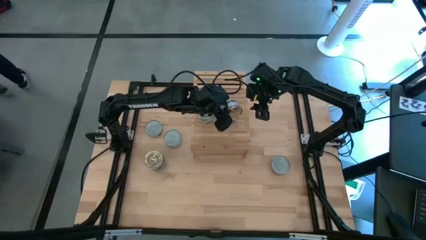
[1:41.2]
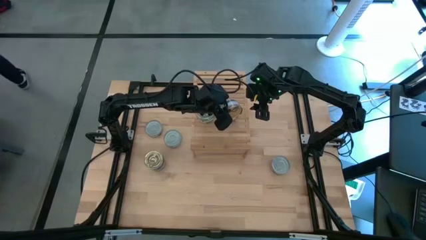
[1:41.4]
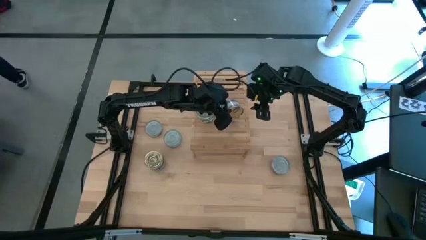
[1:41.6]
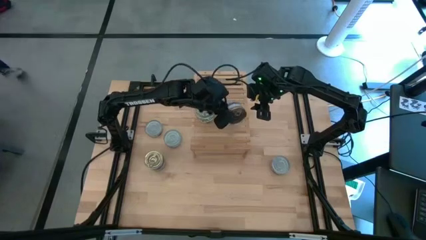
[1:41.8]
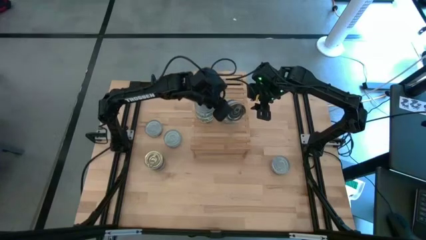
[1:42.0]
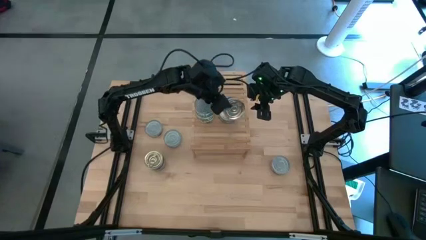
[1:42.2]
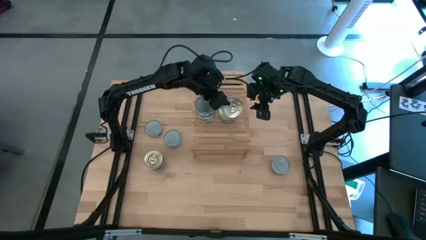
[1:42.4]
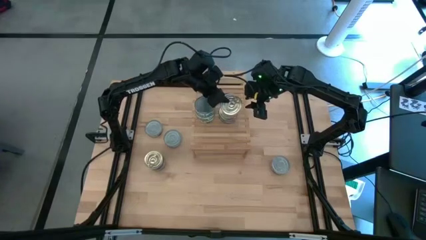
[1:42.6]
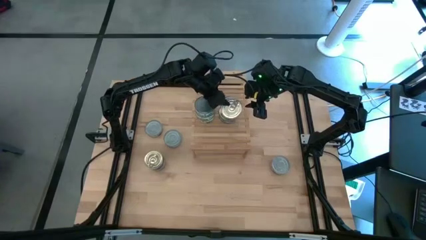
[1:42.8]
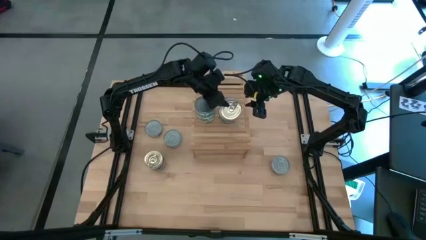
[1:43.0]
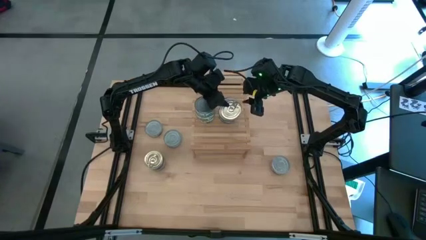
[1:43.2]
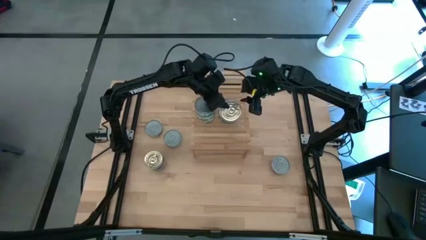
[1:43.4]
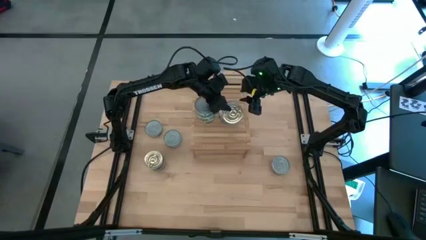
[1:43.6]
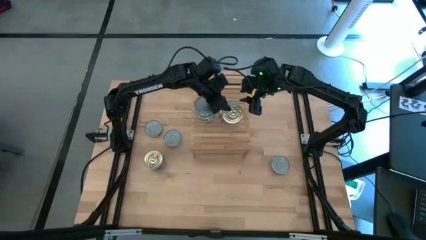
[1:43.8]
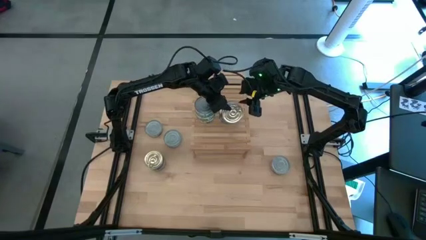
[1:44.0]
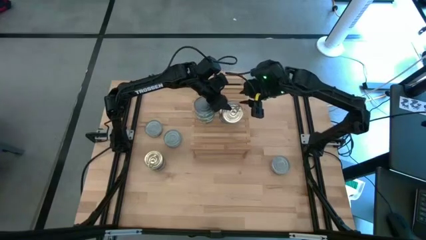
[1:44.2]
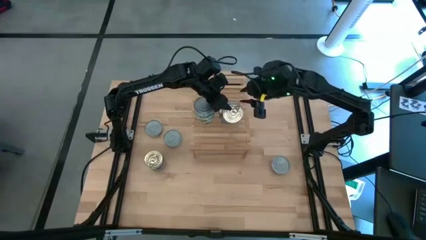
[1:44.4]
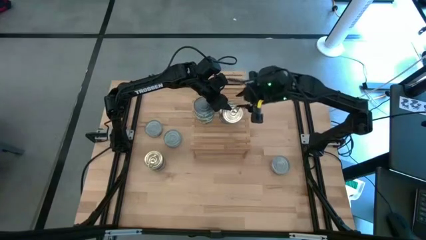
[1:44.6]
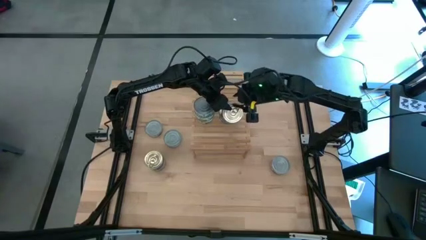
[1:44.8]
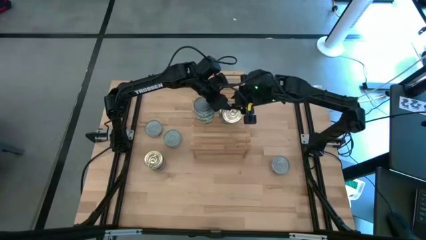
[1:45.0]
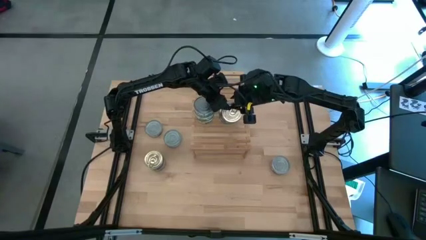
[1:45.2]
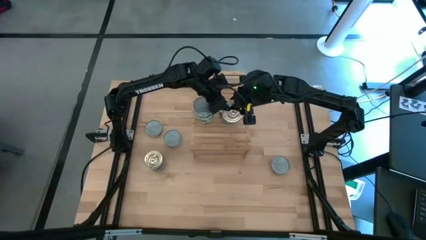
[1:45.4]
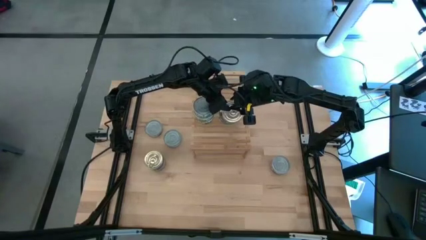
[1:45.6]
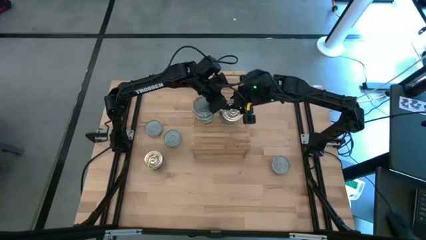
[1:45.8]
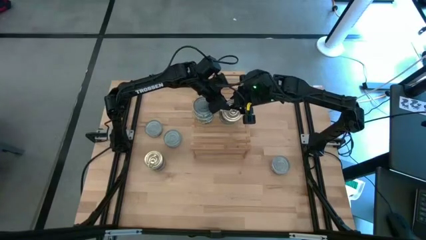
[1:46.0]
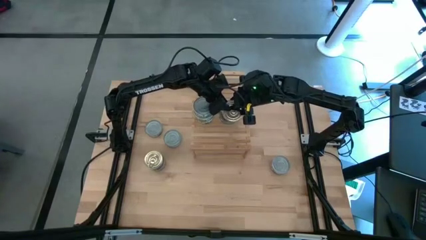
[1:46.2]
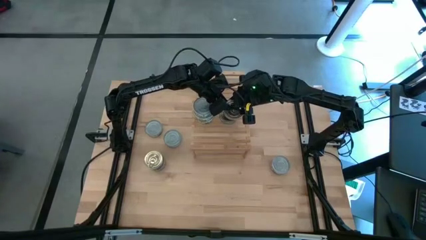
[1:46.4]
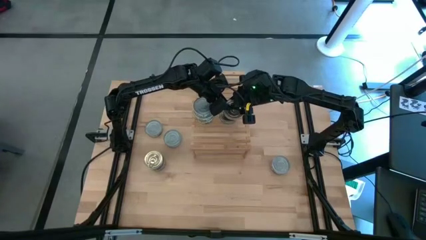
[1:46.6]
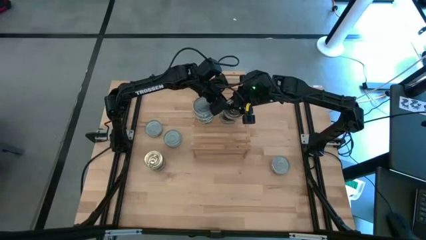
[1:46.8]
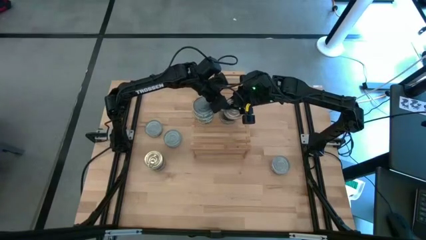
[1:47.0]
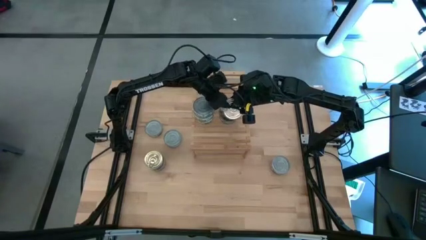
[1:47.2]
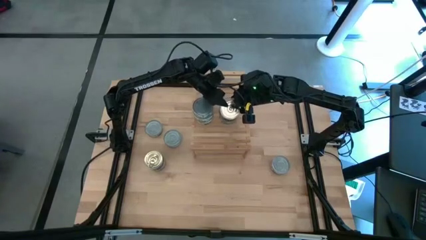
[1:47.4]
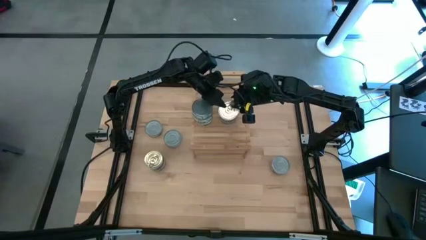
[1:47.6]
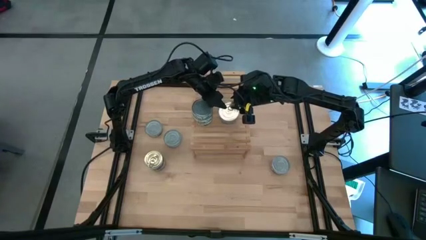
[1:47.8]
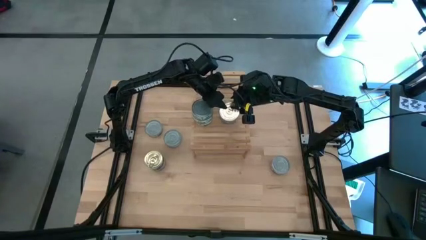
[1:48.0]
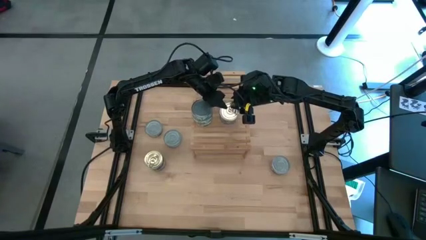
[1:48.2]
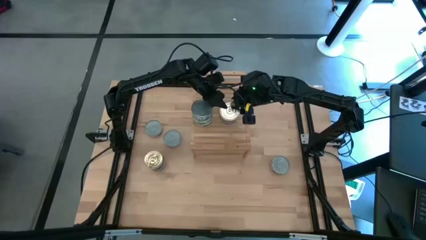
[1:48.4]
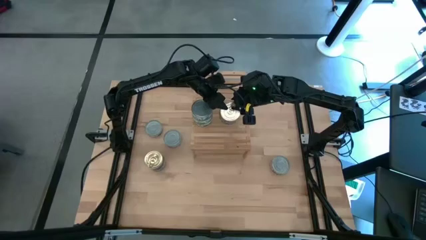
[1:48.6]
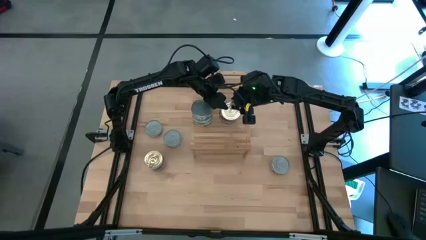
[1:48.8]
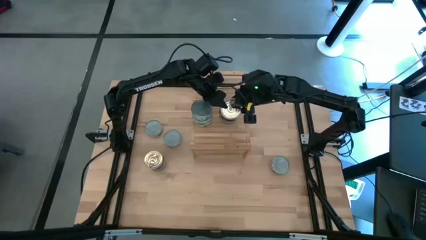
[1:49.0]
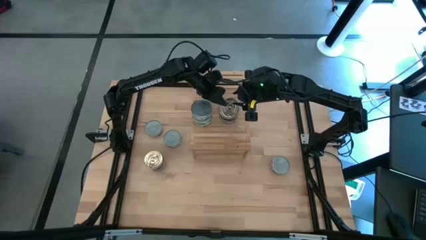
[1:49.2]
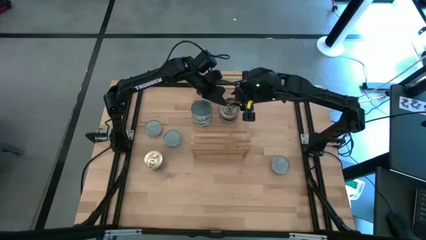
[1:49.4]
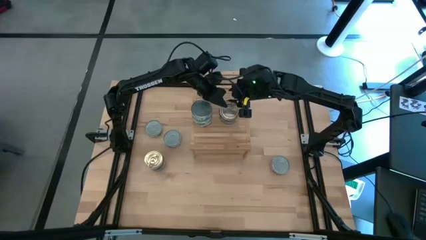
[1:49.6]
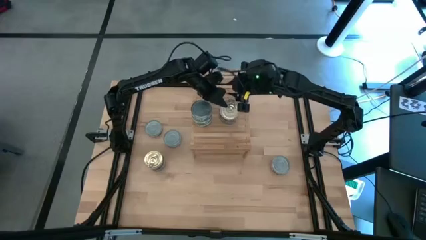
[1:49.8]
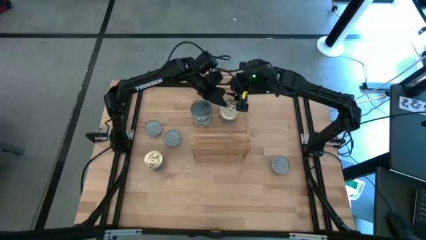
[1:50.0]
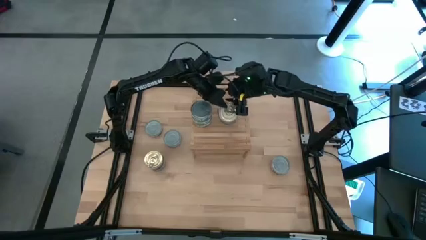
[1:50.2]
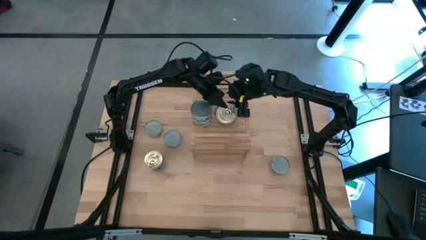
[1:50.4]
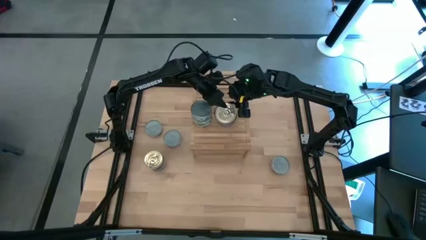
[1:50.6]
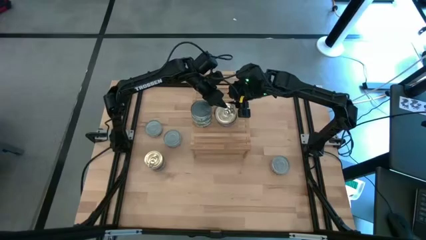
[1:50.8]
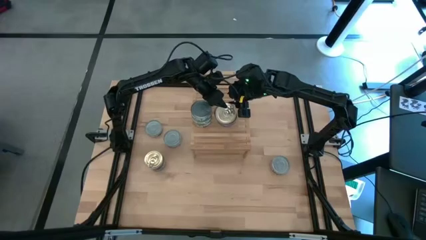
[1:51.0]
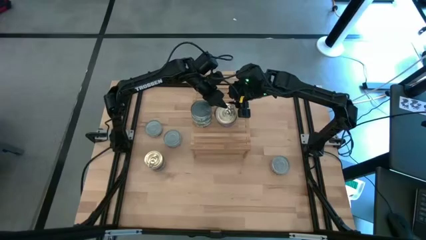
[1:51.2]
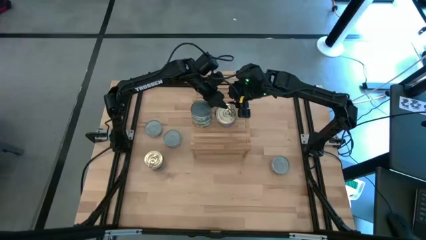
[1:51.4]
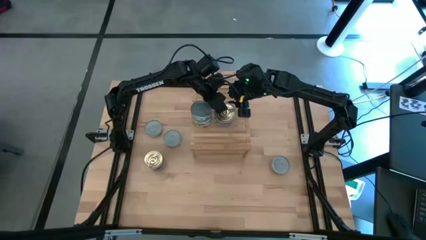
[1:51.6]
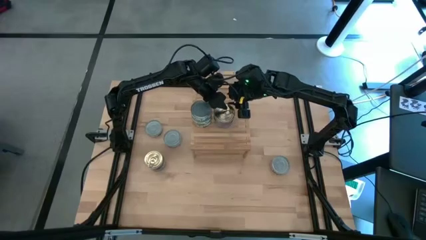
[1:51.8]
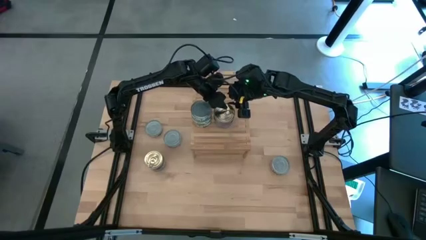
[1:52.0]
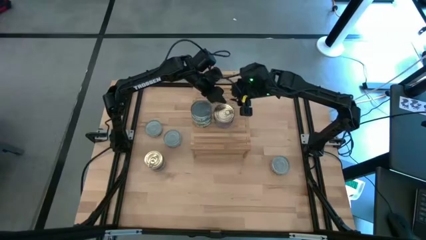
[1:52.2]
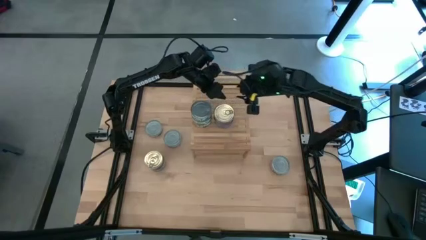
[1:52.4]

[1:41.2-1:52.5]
Task: Stack canned seafood by type on shelf
Stack the blue tuna can on top of the blue tuna can on the shelf

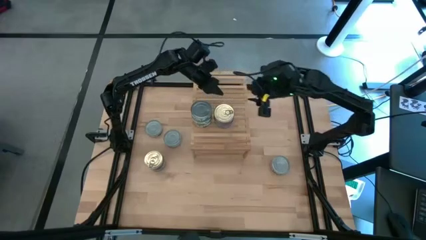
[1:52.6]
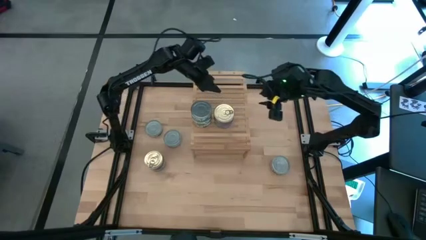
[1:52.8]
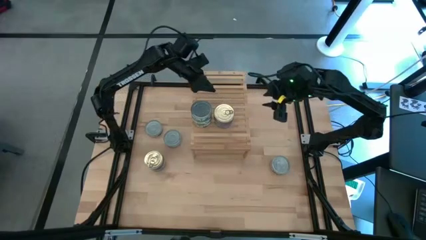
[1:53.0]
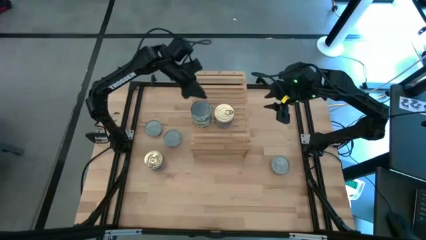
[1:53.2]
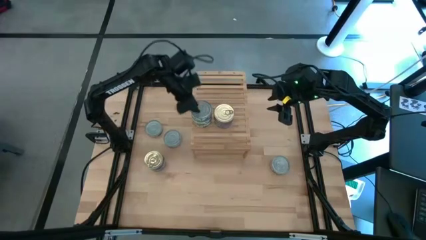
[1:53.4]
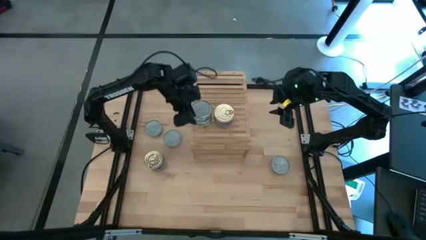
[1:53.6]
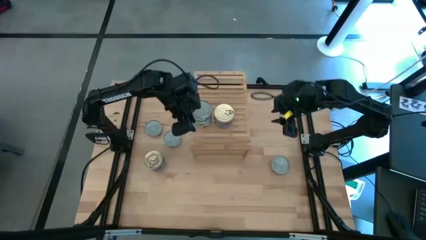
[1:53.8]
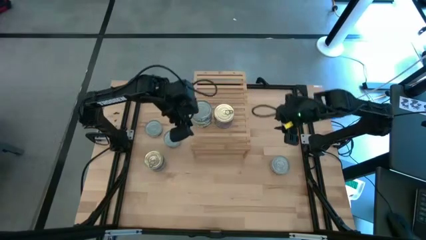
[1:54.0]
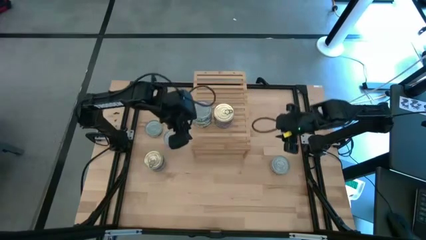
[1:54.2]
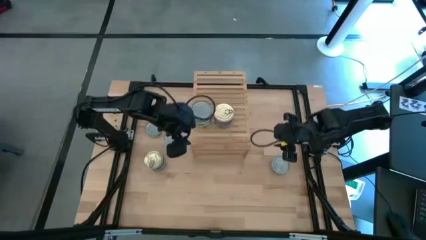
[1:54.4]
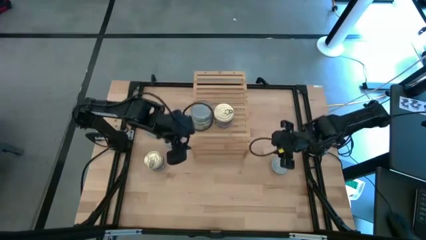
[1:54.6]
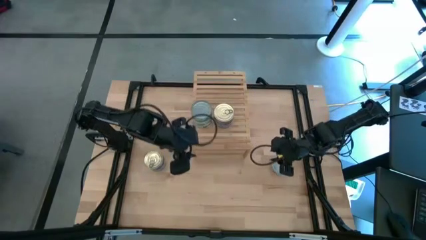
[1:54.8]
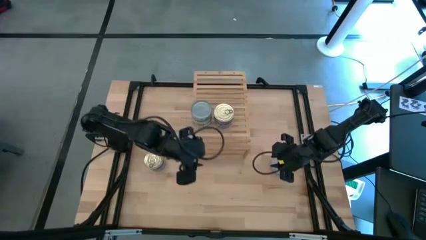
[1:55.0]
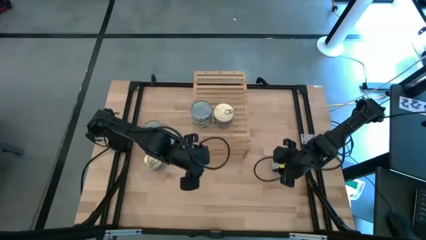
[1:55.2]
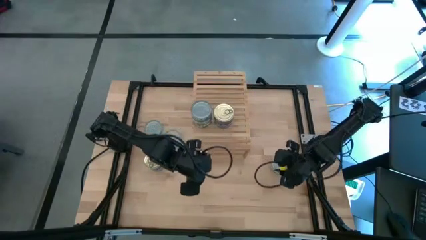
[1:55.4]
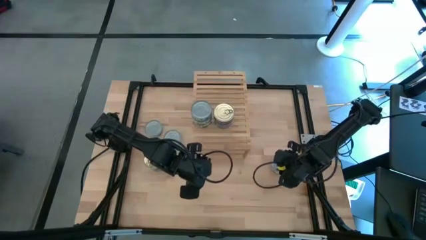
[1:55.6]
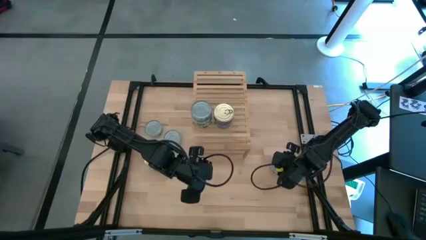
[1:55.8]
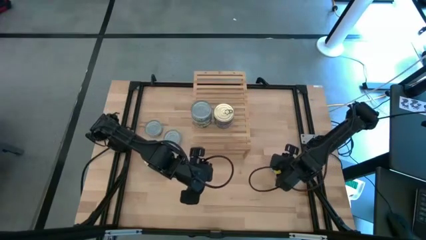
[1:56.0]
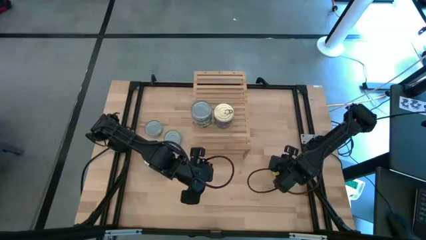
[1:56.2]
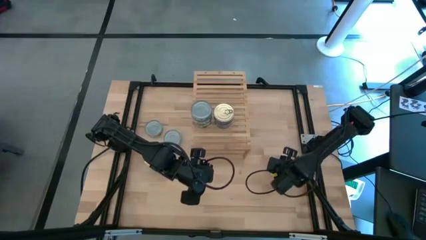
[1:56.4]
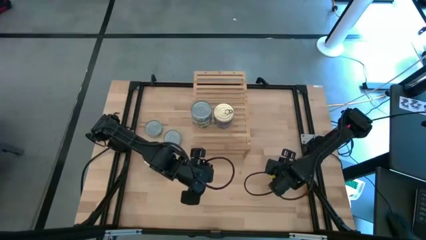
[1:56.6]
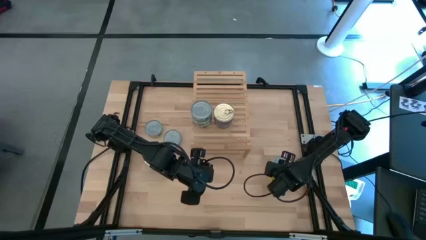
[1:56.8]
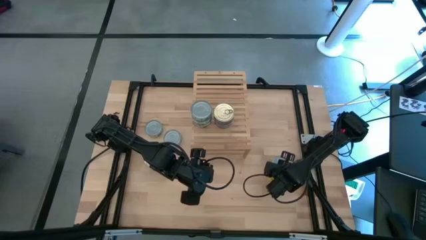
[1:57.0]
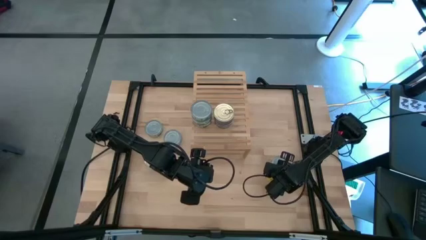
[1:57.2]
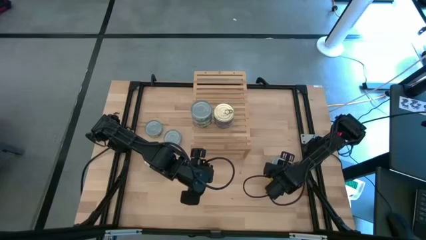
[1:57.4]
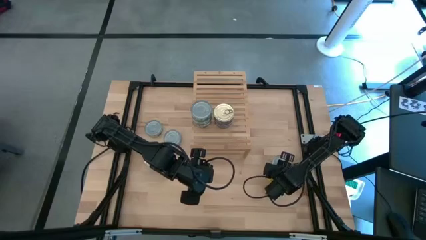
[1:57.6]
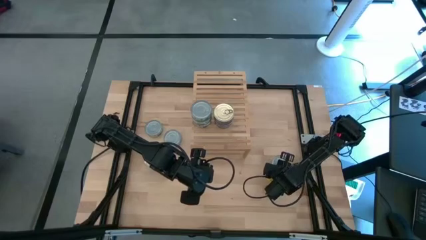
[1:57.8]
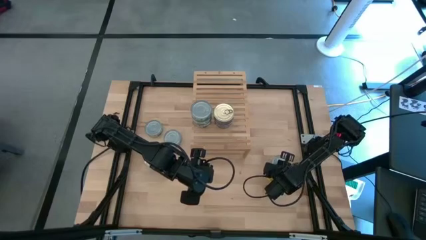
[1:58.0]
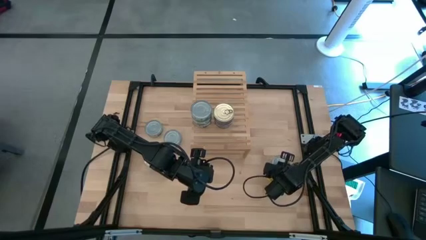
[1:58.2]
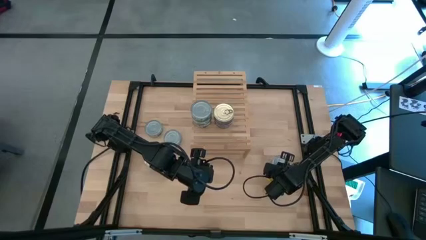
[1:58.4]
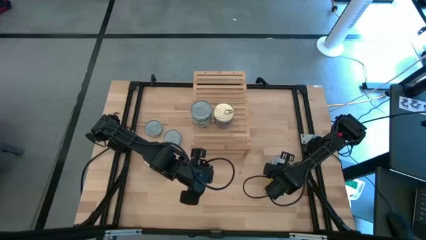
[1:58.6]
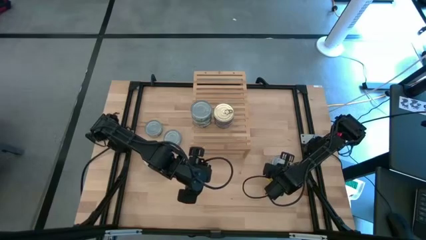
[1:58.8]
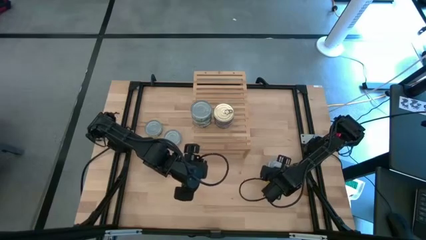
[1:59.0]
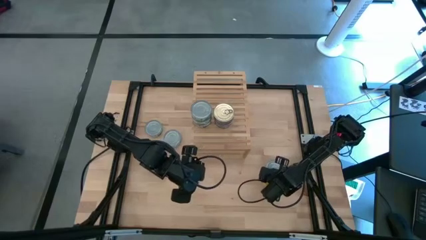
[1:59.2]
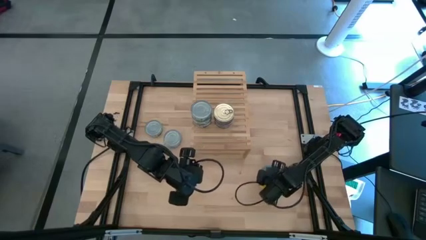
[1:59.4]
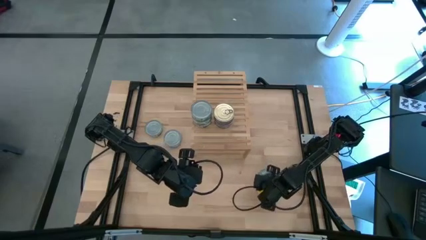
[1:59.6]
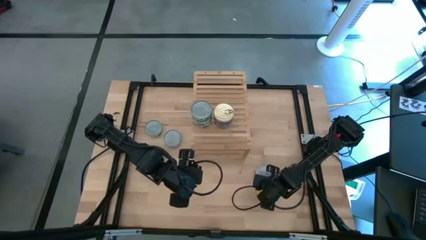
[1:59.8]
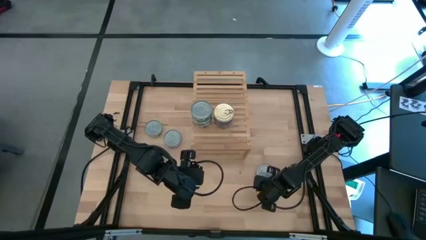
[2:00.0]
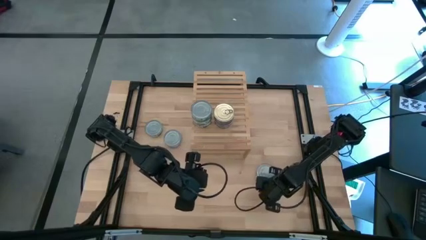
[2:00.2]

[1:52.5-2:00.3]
Move the green tuna can to the center of the table
